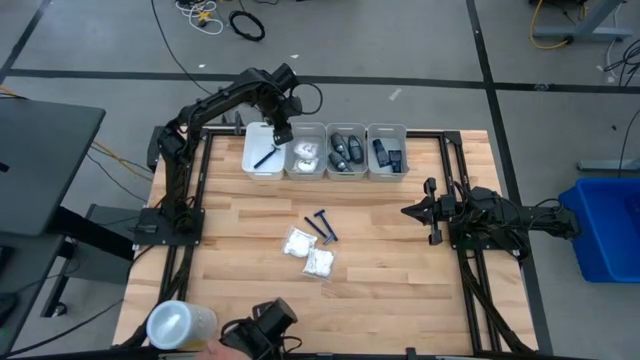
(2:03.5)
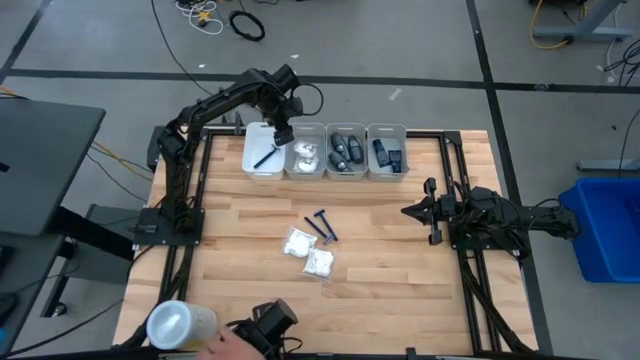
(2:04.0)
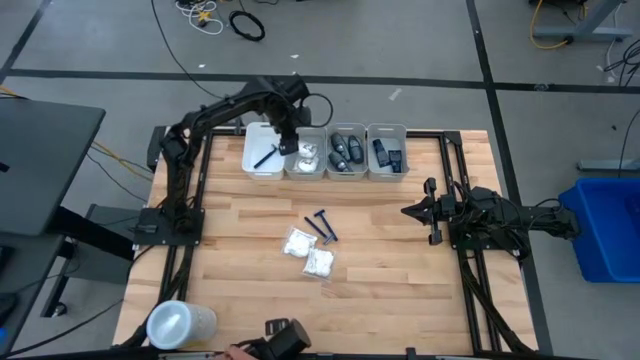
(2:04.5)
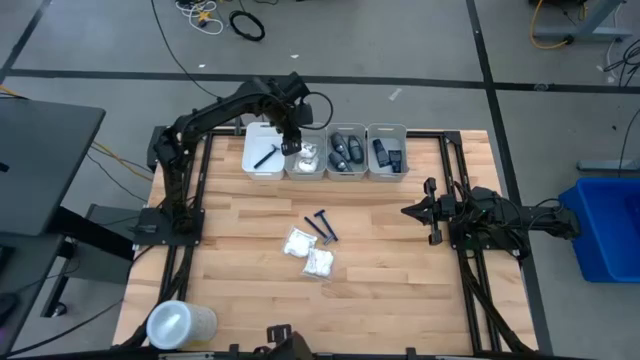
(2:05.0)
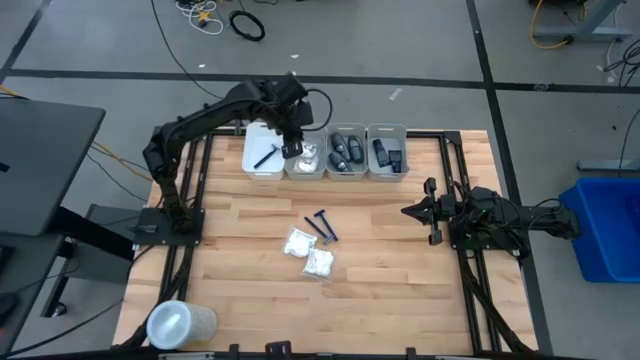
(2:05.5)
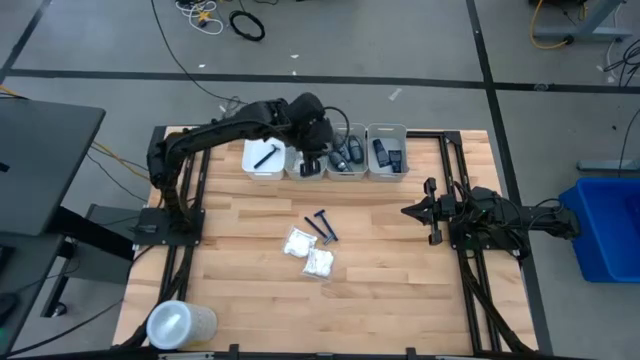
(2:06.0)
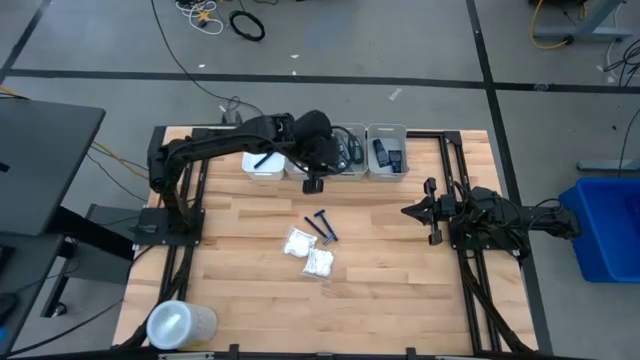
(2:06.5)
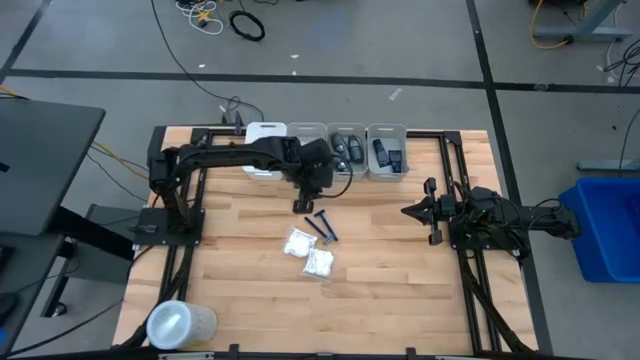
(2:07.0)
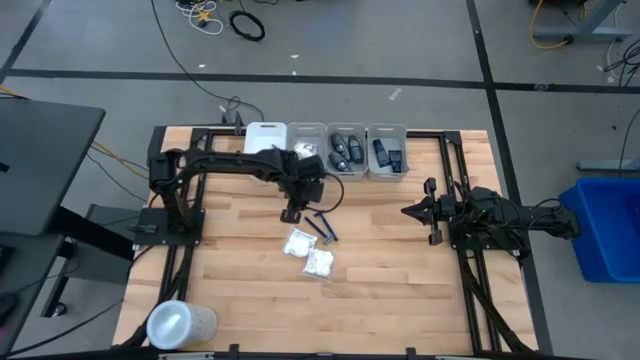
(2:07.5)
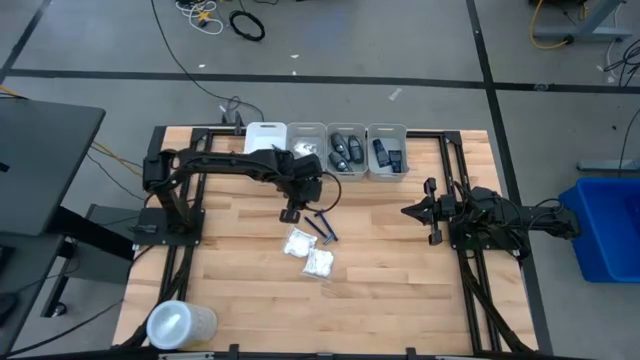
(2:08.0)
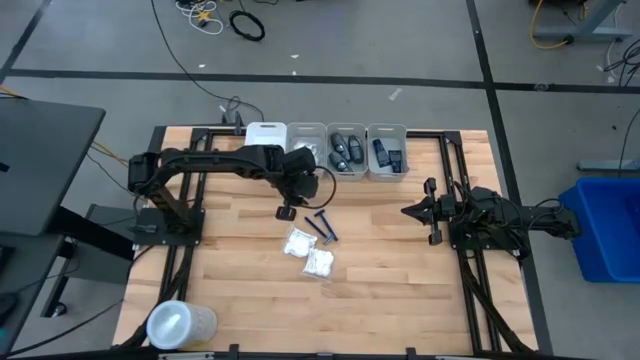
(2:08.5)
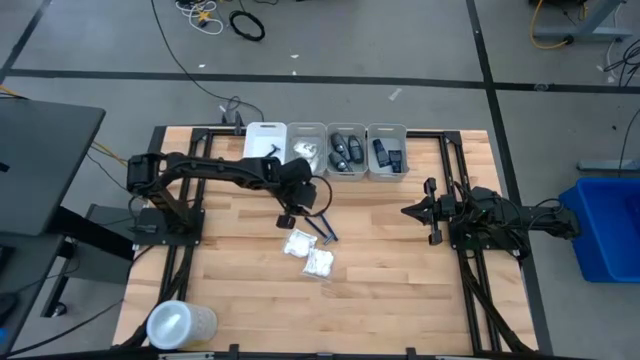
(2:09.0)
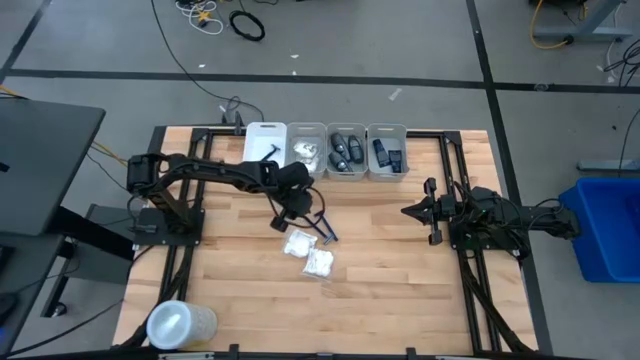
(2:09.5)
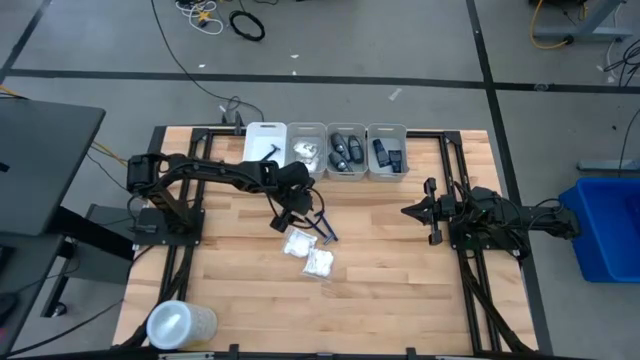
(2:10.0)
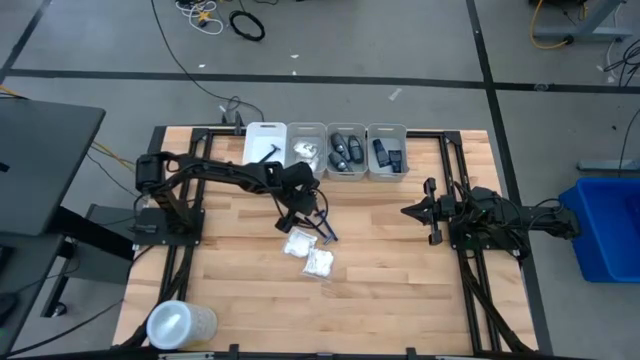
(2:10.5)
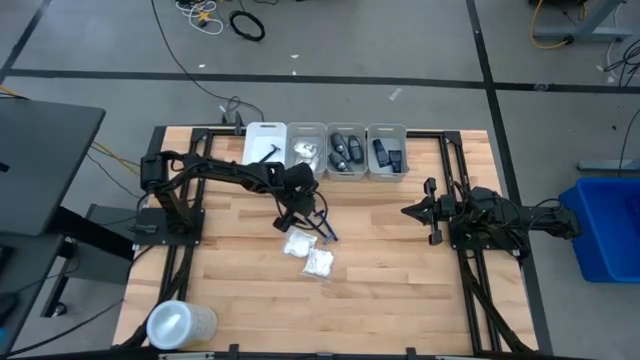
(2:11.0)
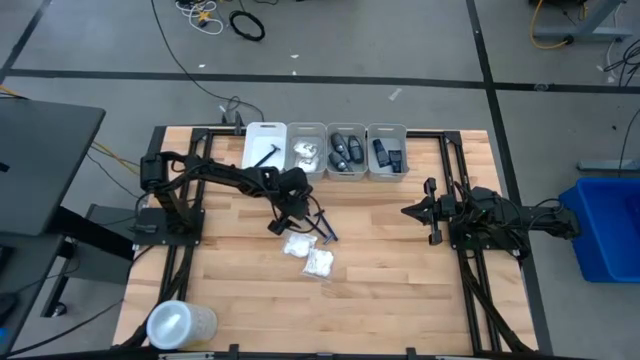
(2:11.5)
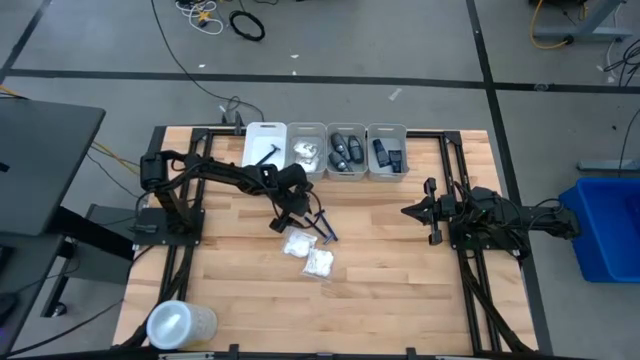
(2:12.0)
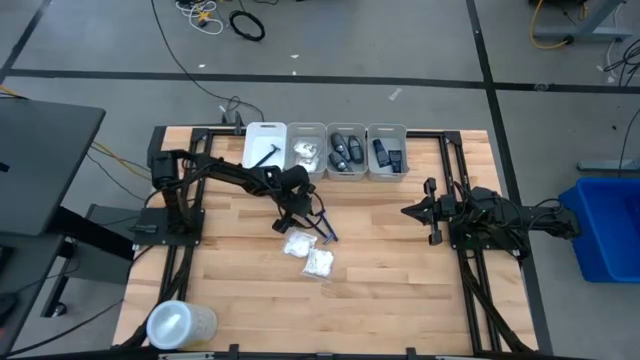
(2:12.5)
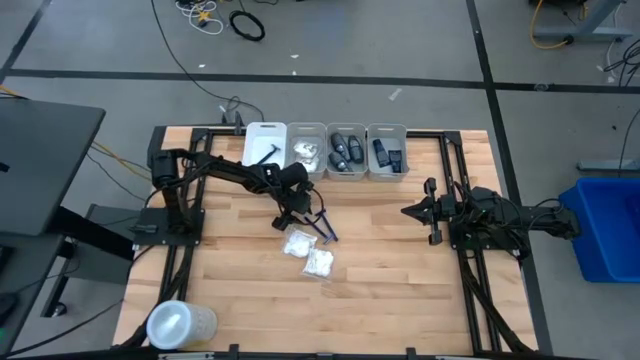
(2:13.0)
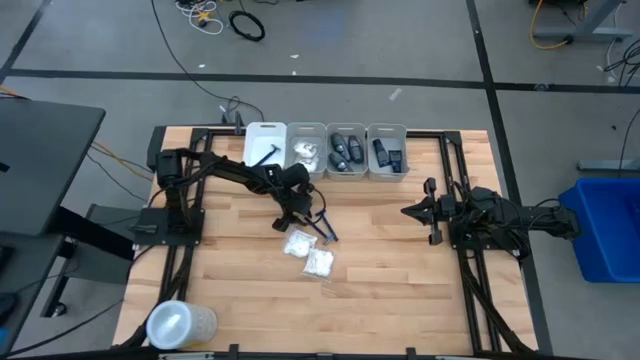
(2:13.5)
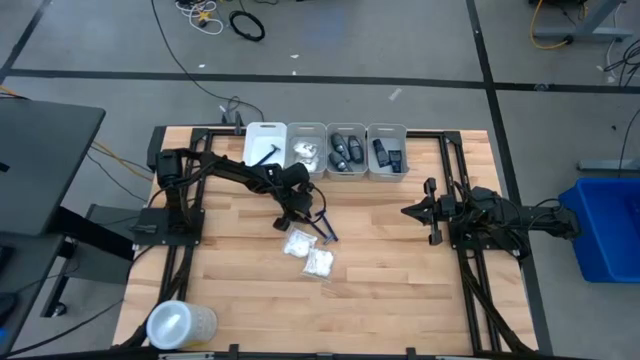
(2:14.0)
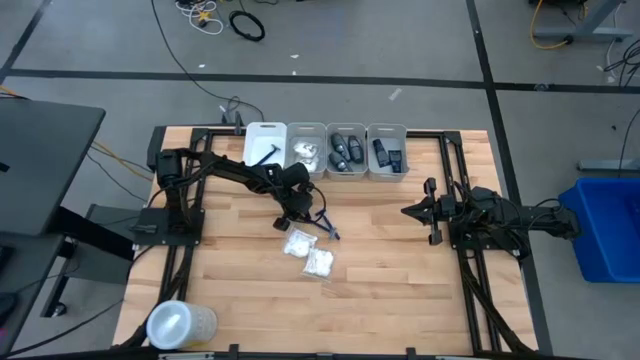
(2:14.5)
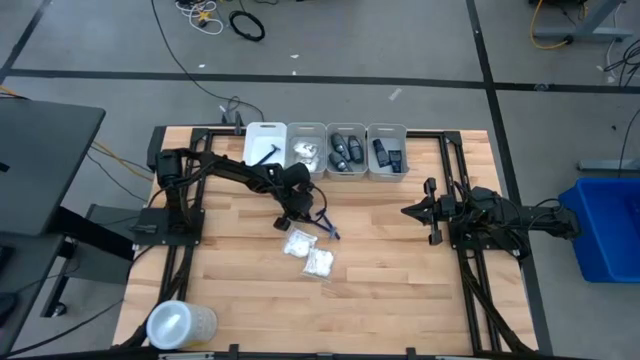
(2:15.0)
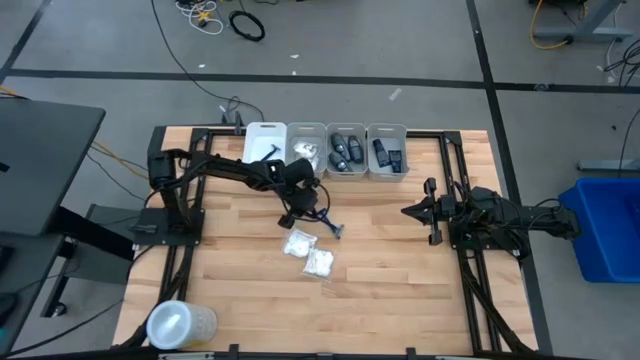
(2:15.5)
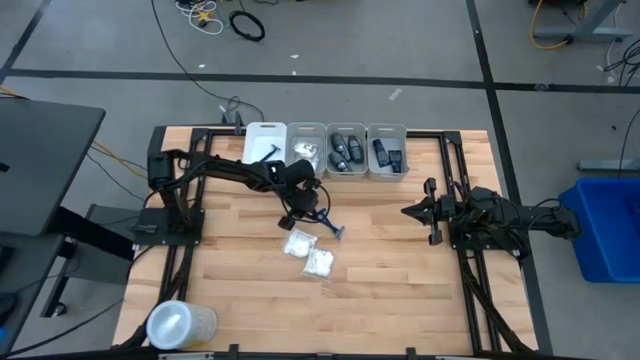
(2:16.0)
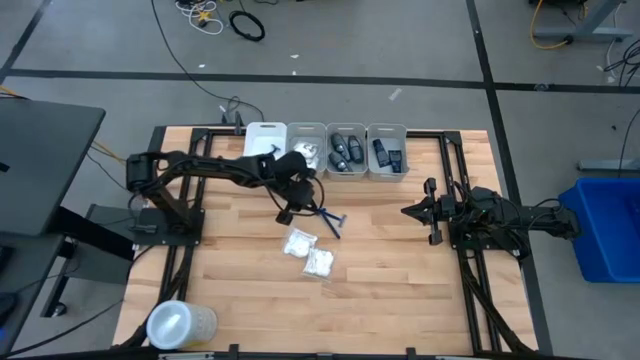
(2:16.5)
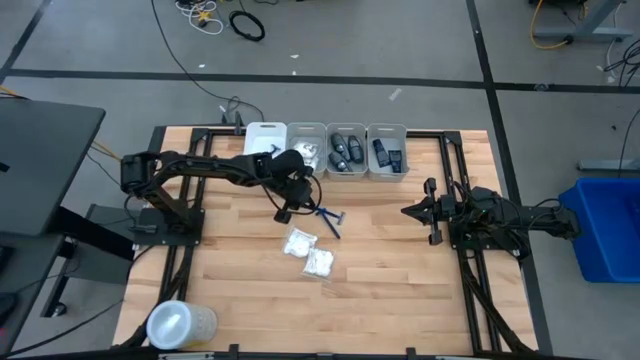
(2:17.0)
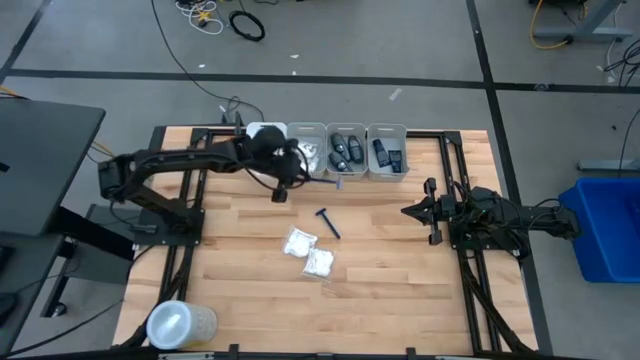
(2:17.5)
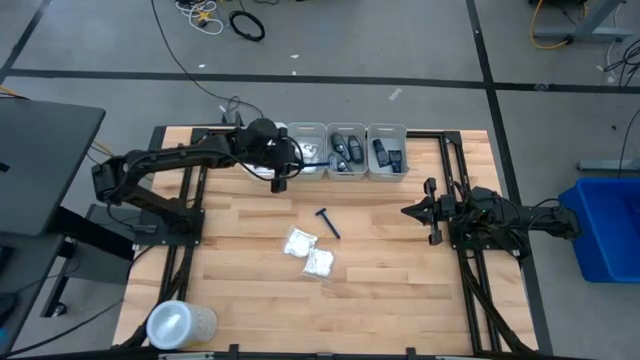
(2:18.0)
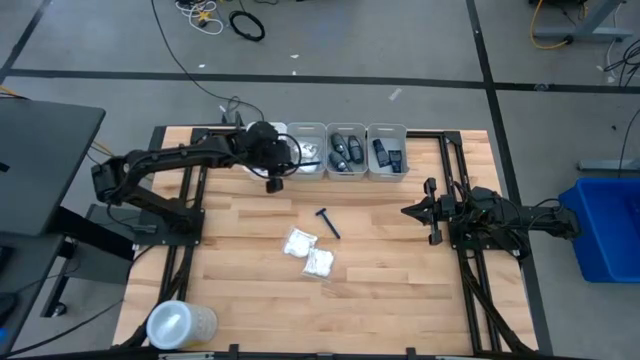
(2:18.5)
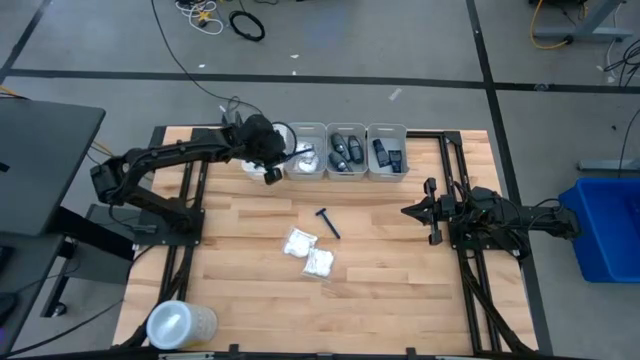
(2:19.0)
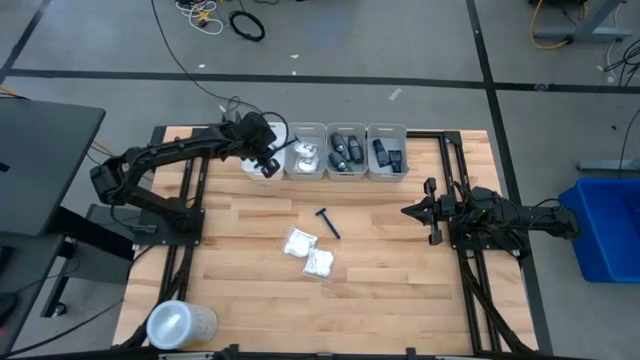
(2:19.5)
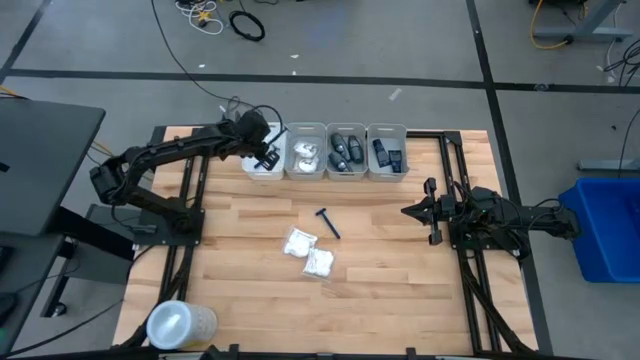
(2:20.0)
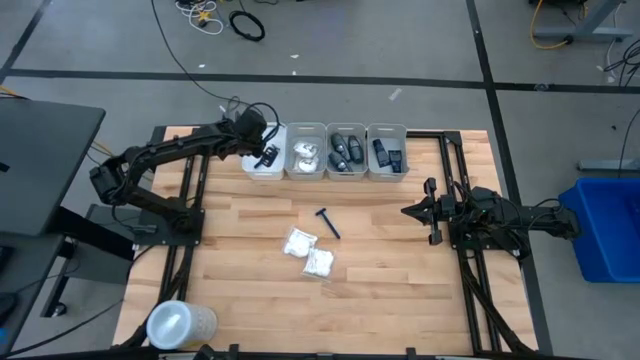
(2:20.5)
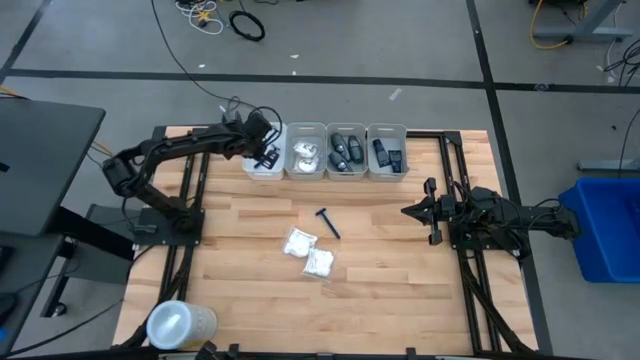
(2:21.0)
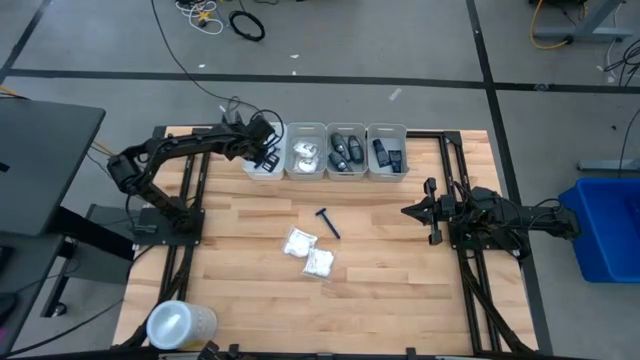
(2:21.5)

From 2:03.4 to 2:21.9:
Task: Pick & Place Travel size toiletries
Put the blue razor into the white bin

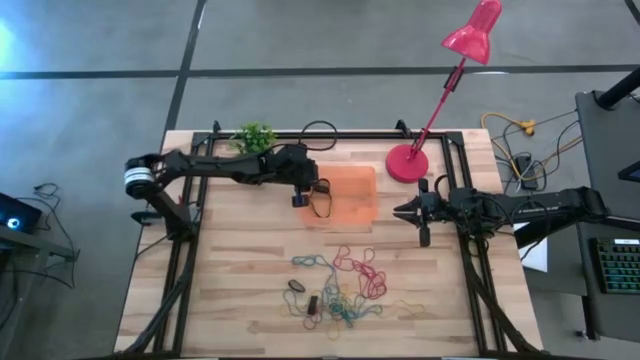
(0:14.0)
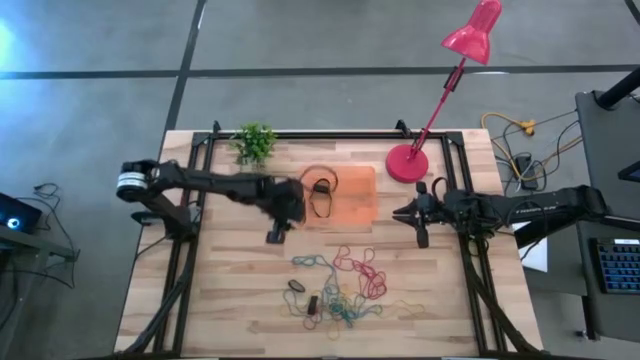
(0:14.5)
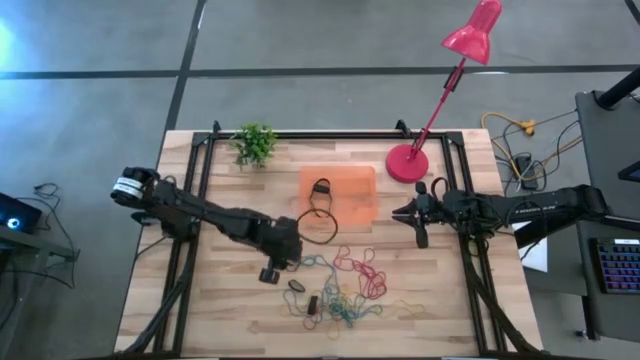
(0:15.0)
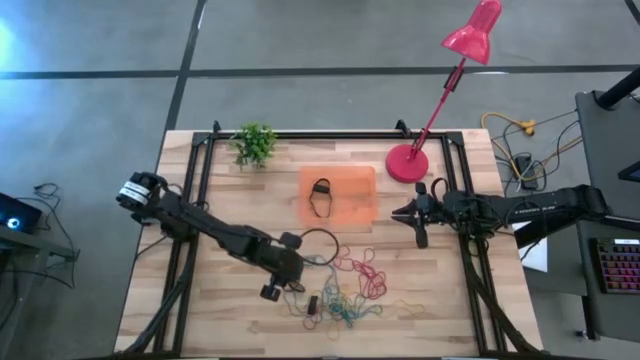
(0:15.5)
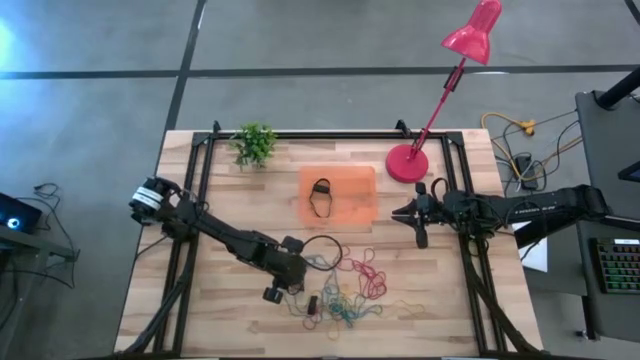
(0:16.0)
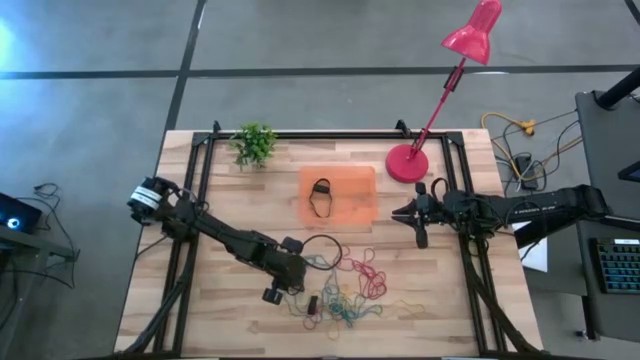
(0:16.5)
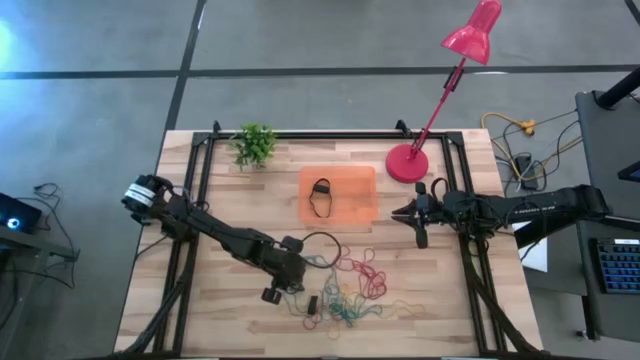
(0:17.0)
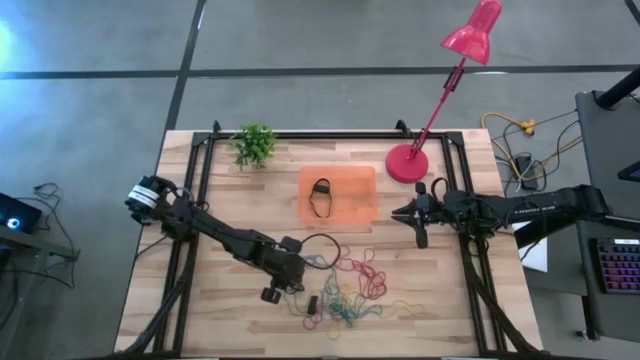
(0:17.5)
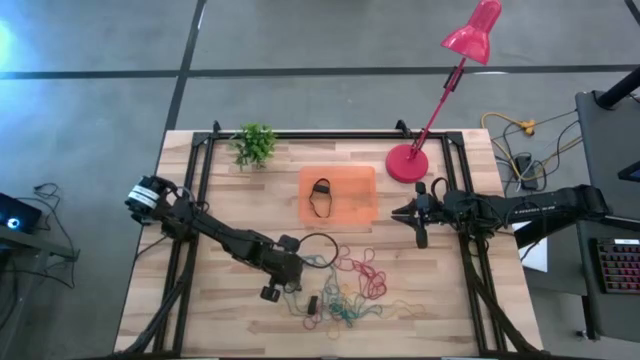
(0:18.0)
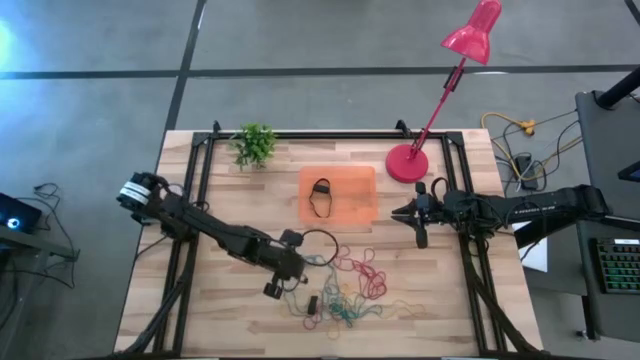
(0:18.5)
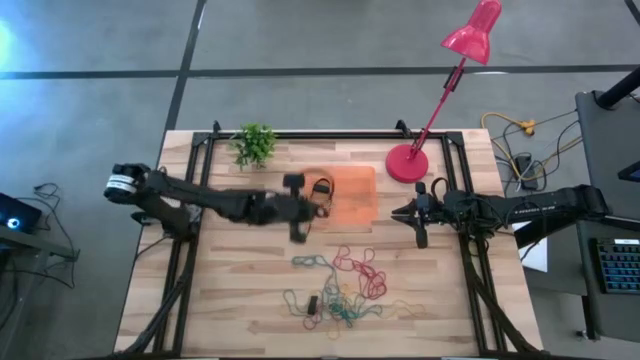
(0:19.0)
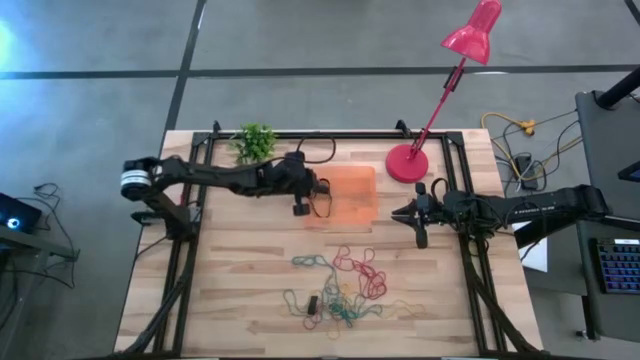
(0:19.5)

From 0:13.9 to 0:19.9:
Task: Pick and place rubber bands into bin
Put the top black rubber band into the bin
